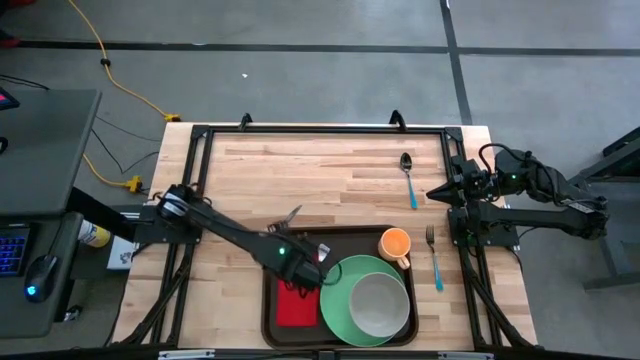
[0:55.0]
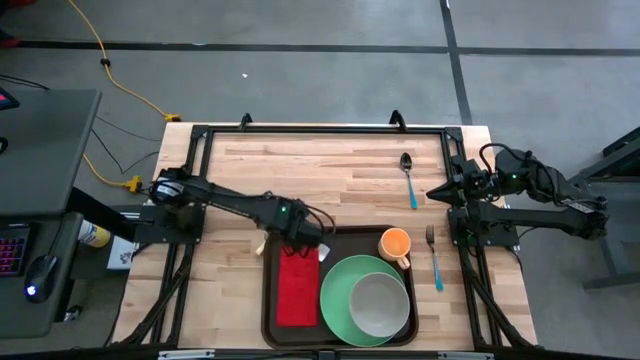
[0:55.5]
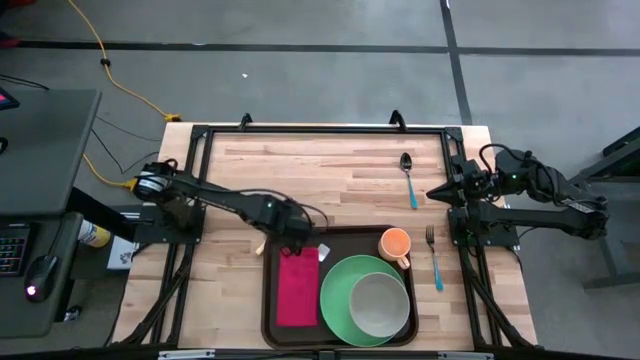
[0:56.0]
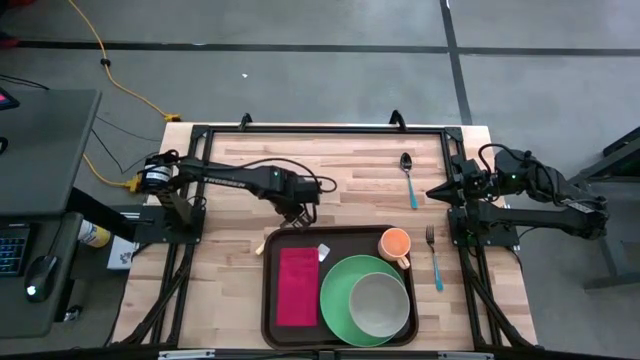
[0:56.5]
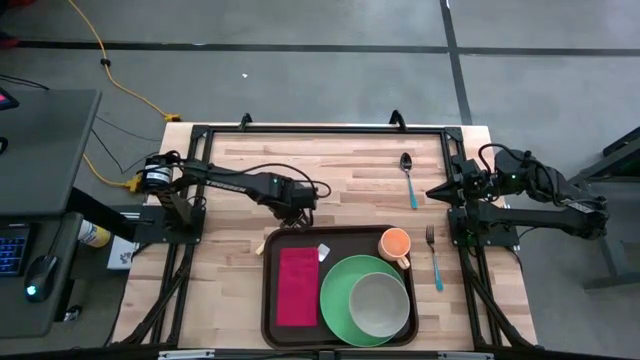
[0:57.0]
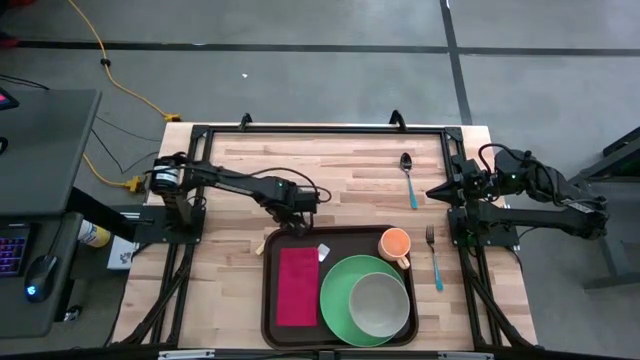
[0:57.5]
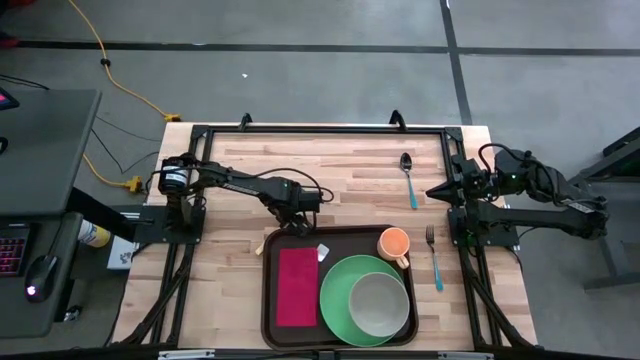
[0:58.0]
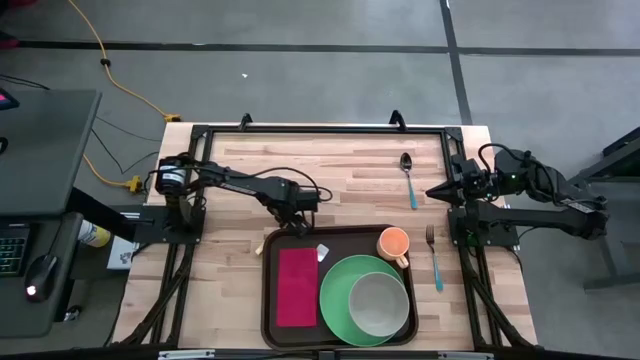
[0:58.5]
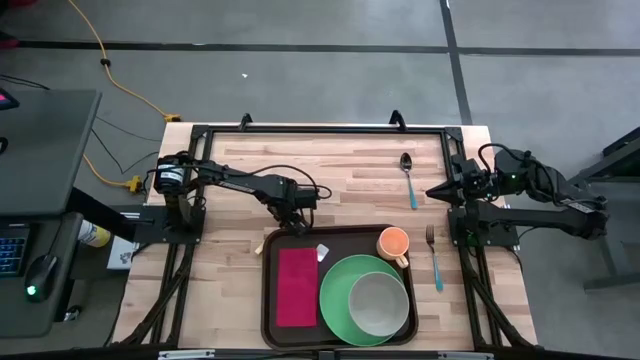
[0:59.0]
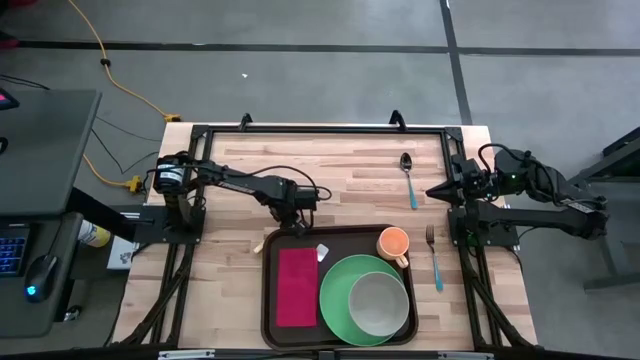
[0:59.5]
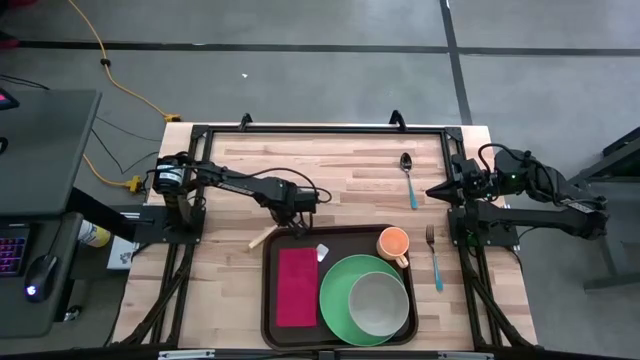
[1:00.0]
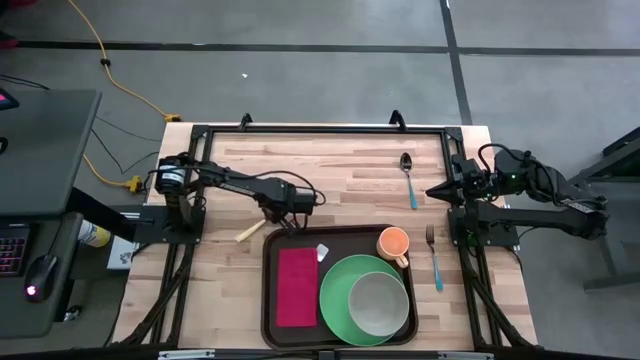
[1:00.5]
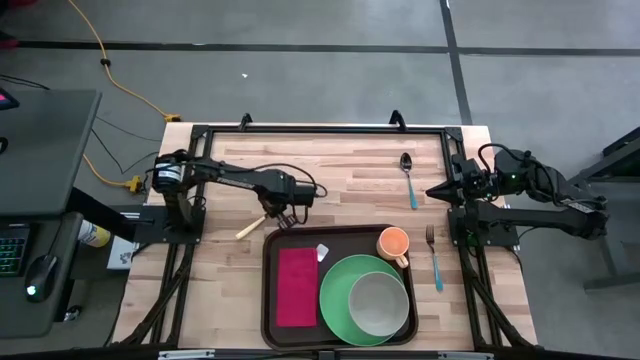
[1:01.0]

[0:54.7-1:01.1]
Task: Set up tray
Put the yellow knife on the red napkin

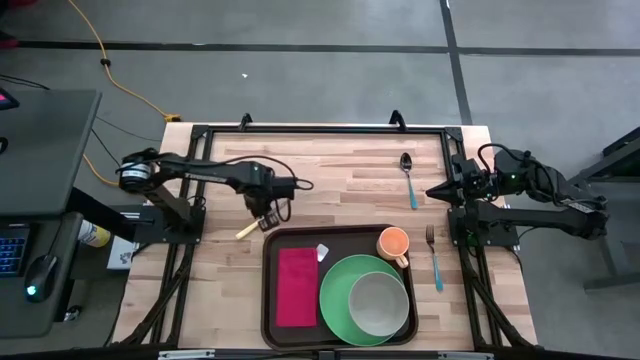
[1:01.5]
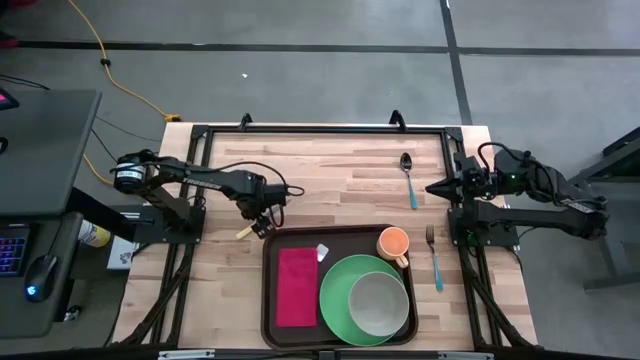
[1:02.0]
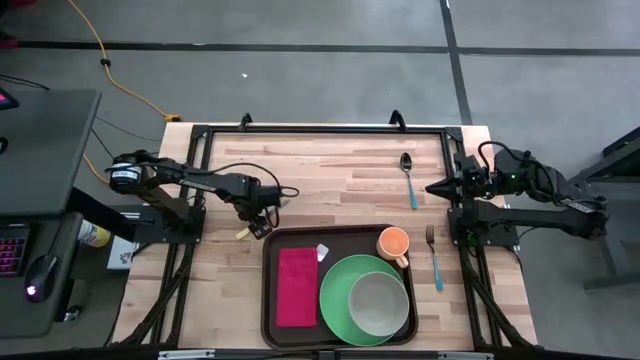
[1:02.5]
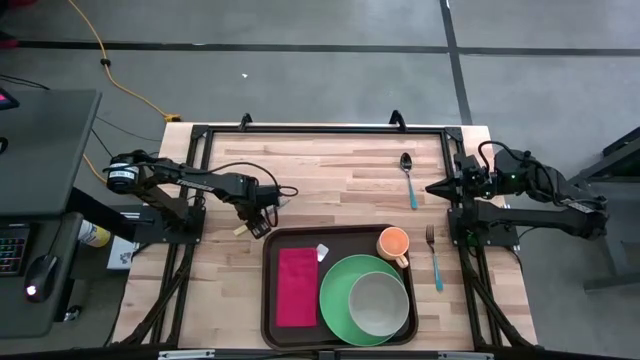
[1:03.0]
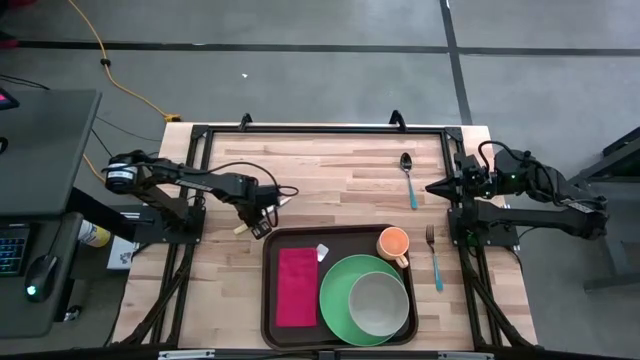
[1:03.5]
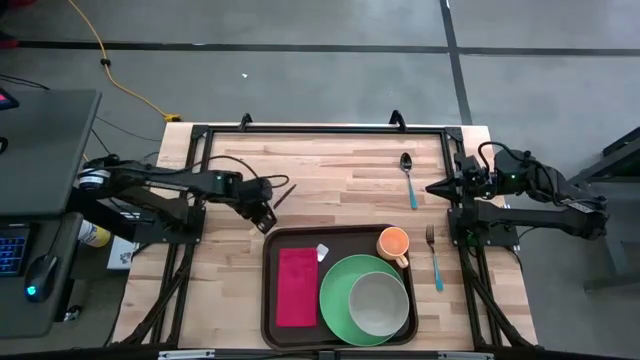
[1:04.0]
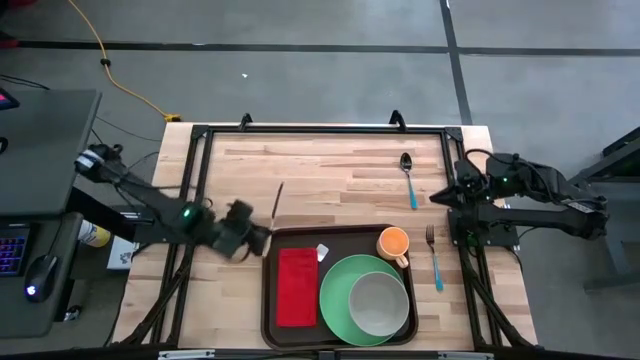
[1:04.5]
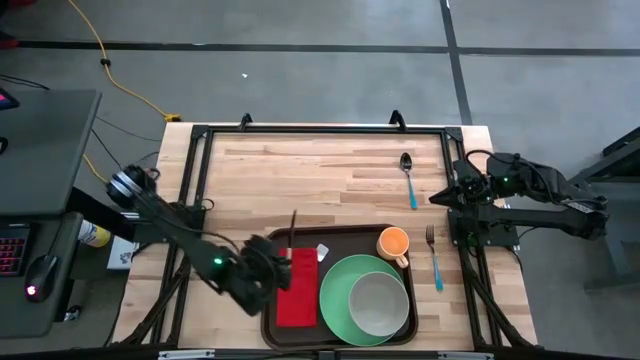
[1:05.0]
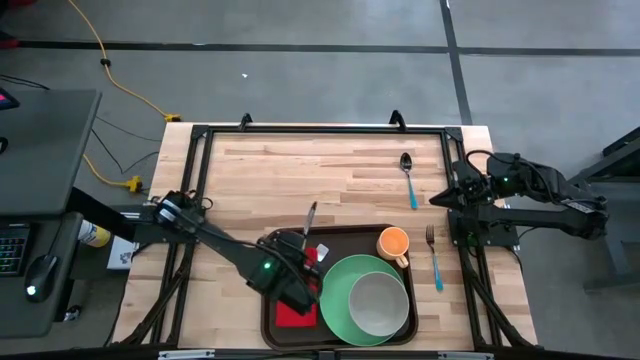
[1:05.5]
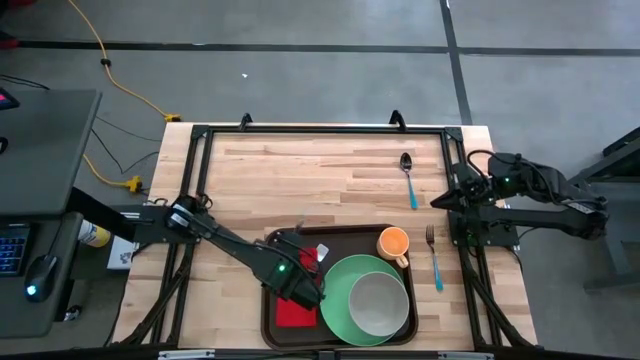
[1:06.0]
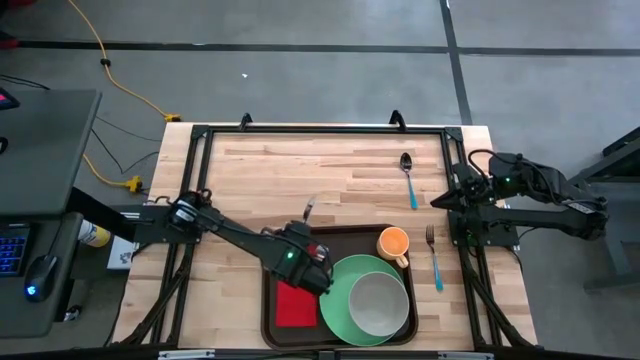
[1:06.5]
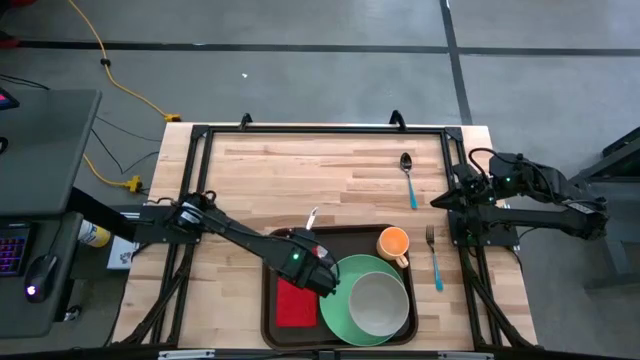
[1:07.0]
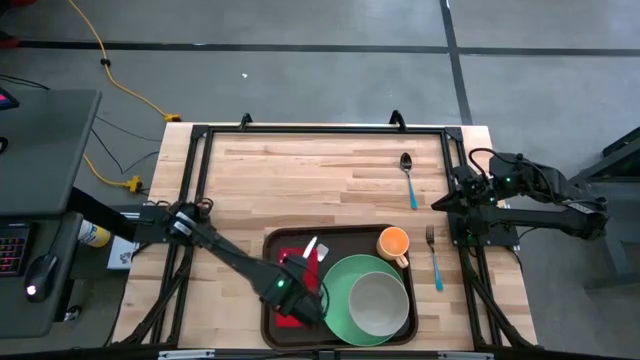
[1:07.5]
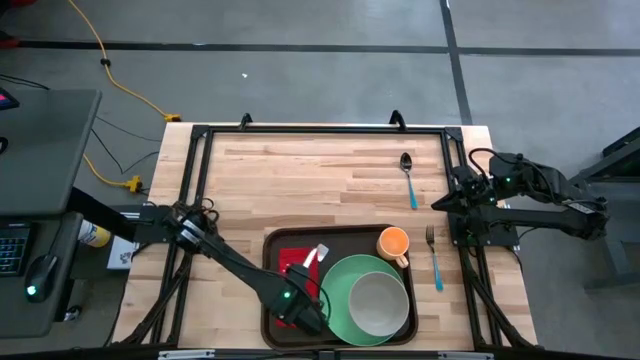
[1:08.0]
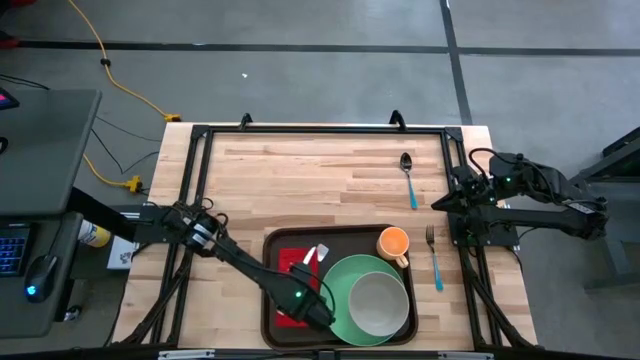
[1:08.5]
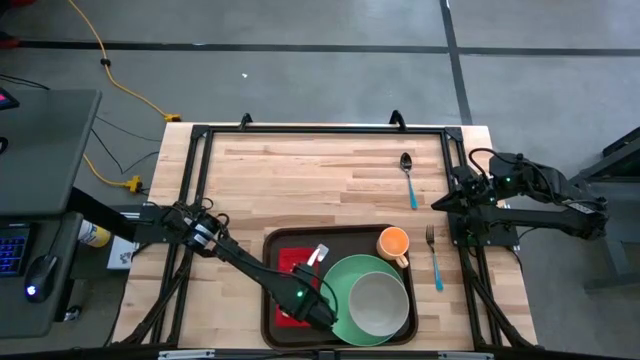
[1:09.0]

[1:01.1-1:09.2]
Put the yellow knife on the red napkin

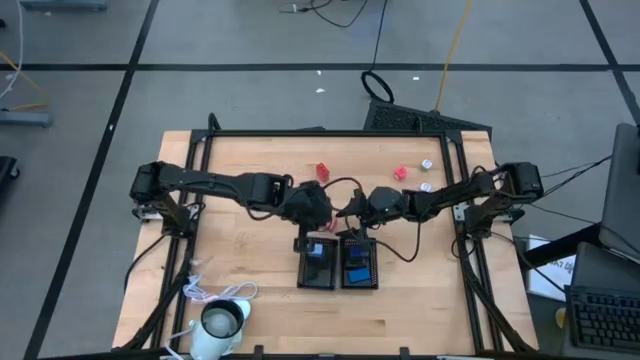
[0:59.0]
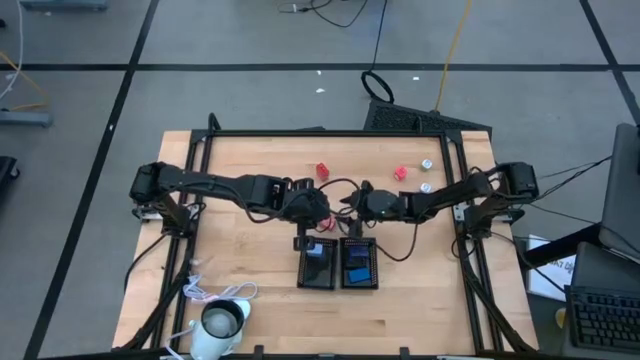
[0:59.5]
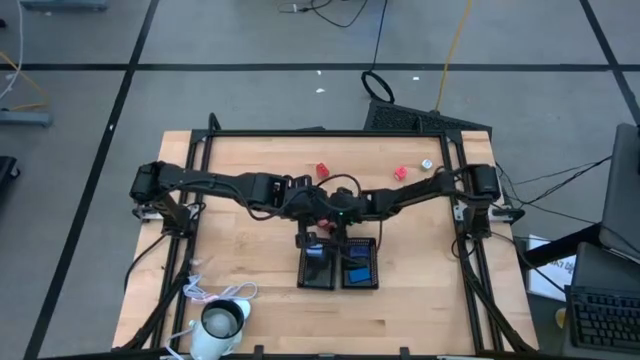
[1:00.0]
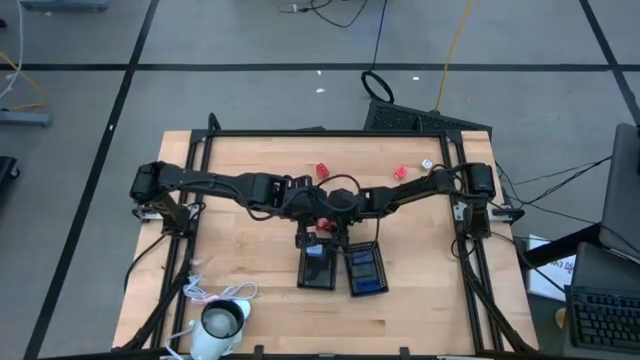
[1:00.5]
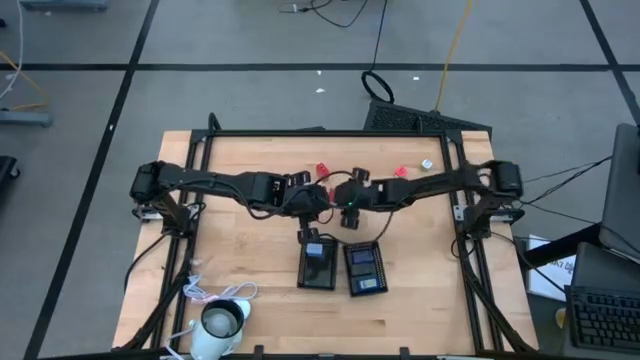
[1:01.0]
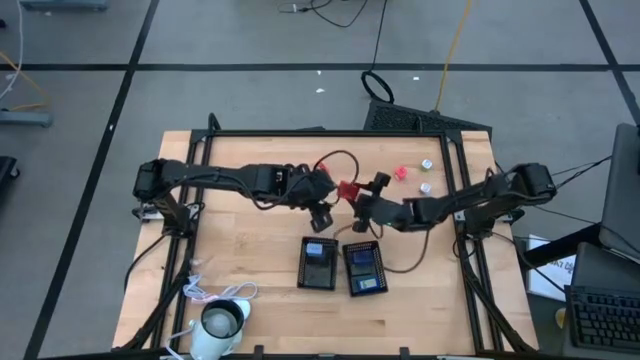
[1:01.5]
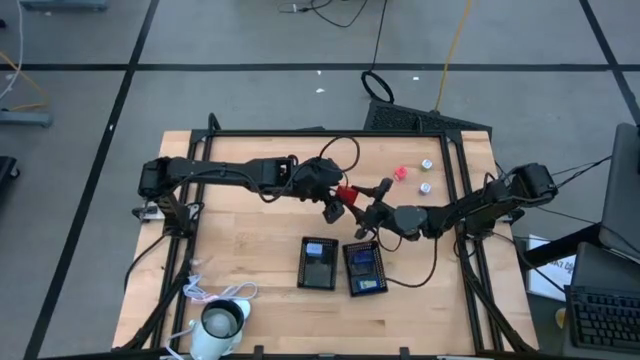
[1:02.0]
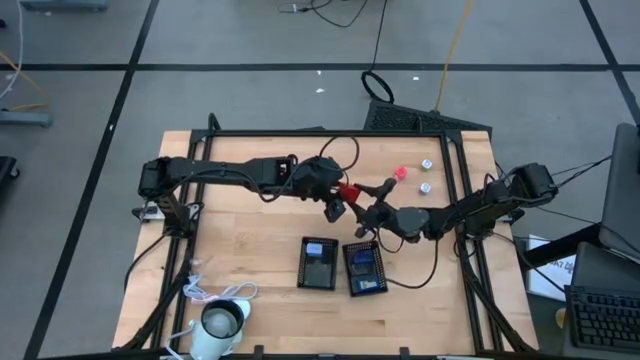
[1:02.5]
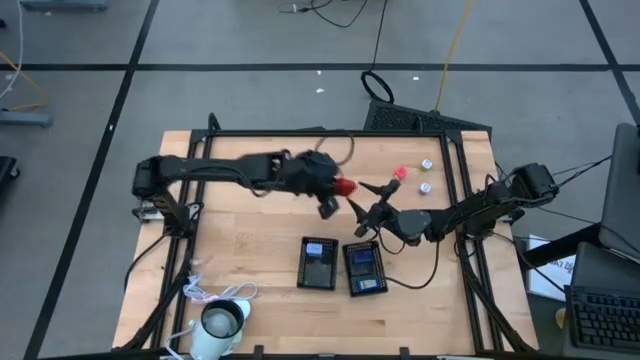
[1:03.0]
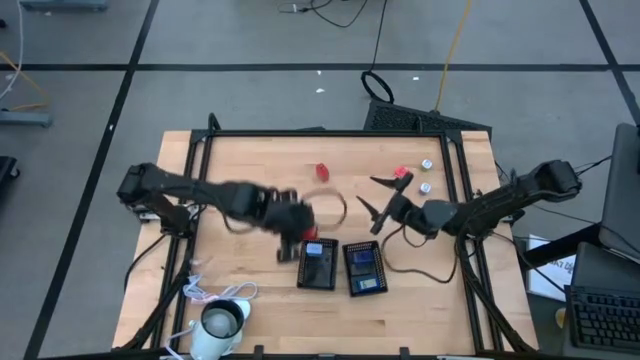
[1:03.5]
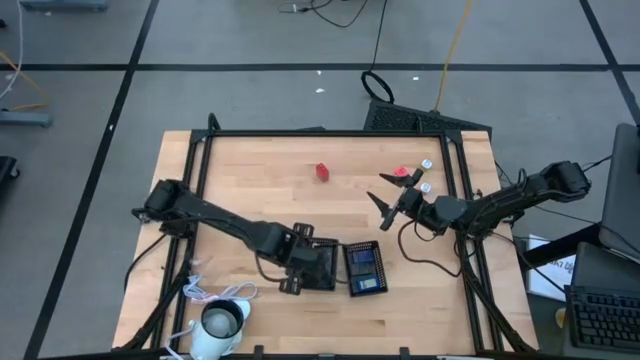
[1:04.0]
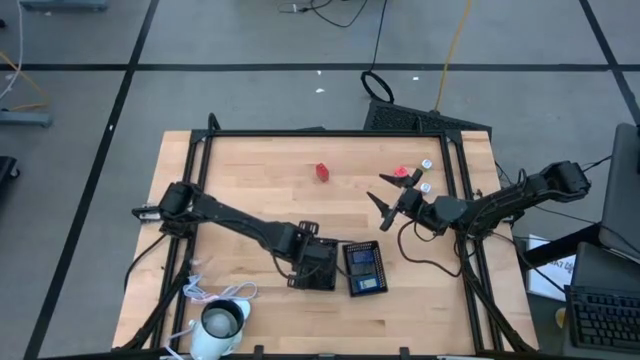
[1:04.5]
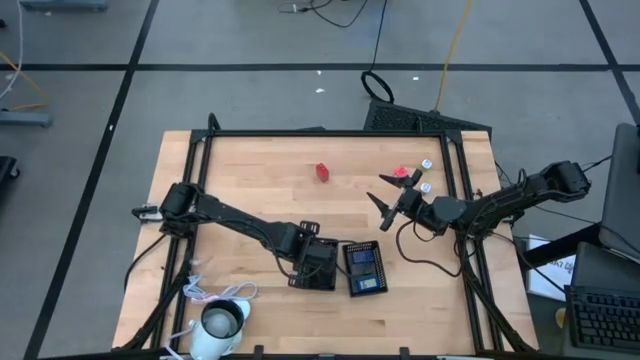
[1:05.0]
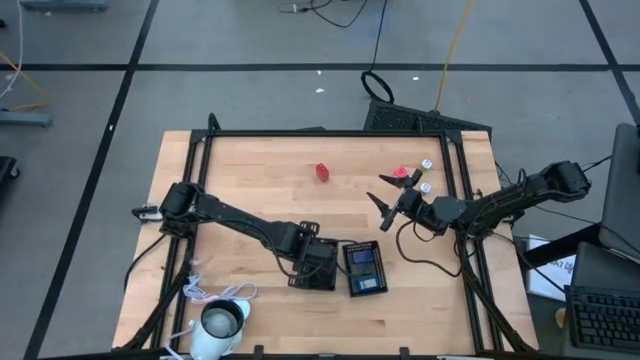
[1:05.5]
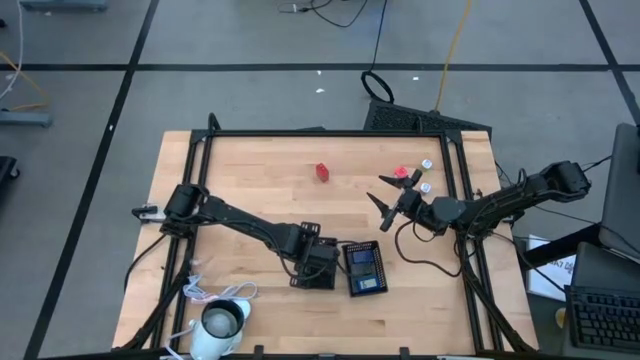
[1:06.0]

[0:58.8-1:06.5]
Task: Pick & Place Office items
Put the right red charger adapter into the left black basket
